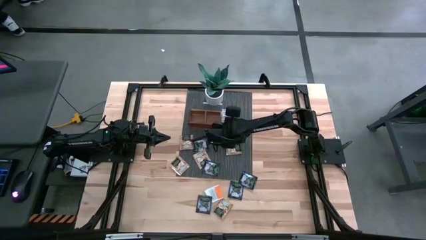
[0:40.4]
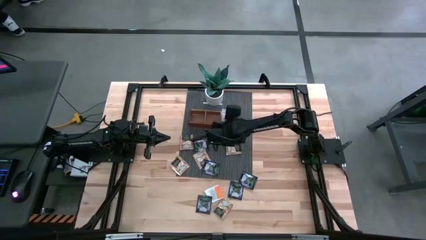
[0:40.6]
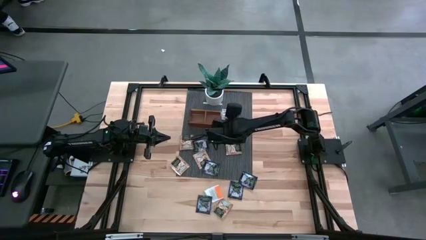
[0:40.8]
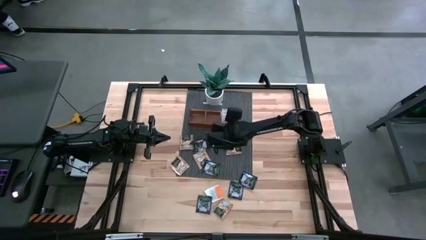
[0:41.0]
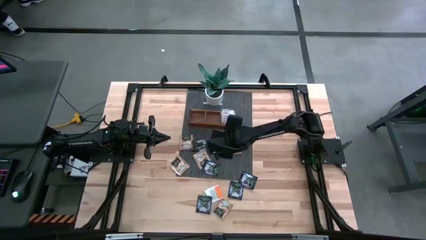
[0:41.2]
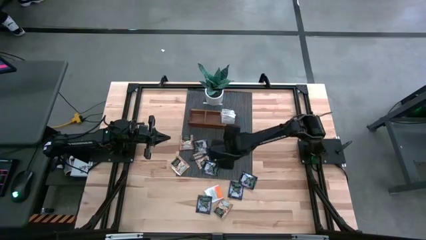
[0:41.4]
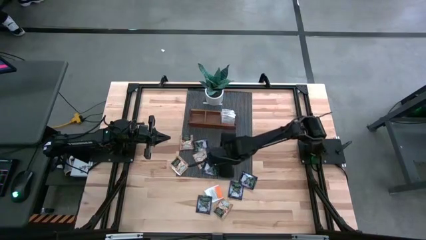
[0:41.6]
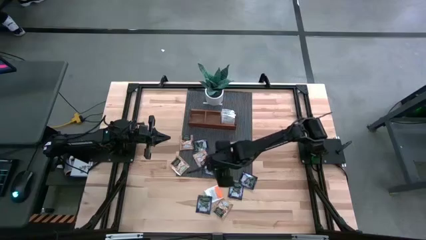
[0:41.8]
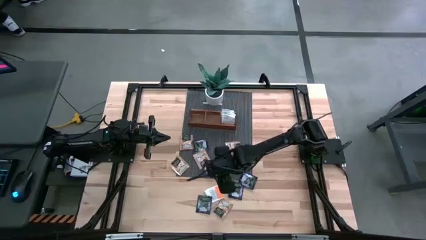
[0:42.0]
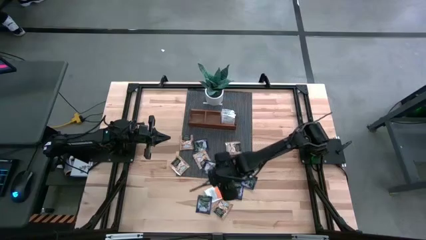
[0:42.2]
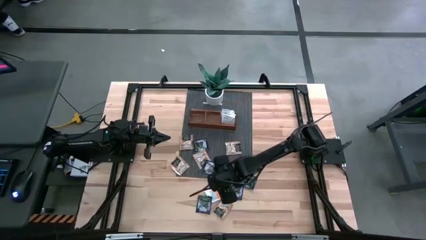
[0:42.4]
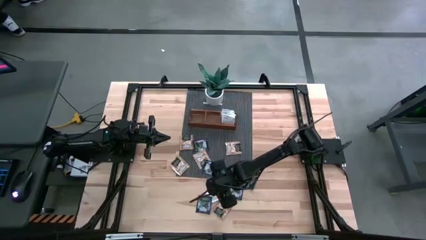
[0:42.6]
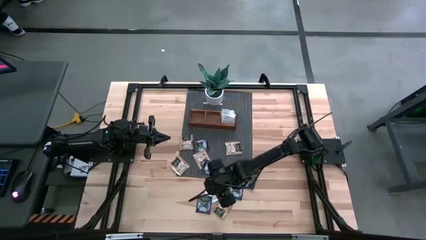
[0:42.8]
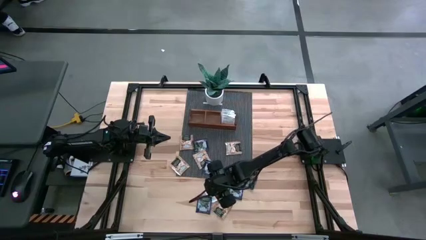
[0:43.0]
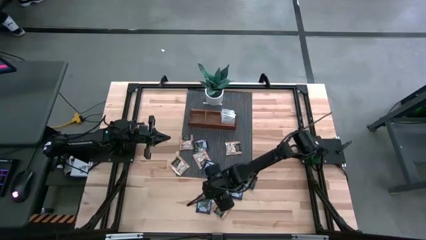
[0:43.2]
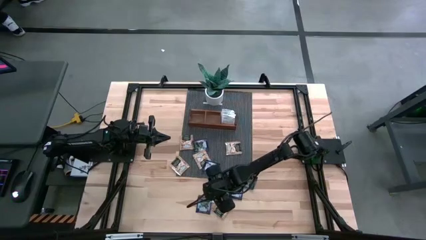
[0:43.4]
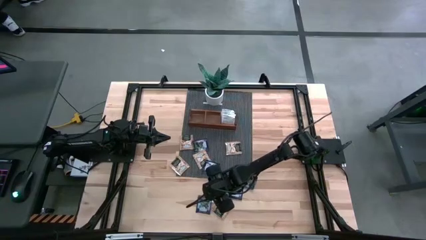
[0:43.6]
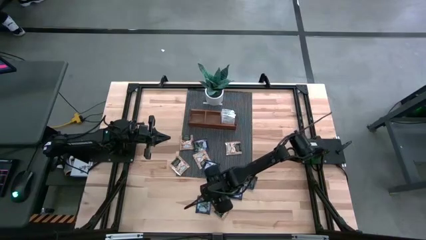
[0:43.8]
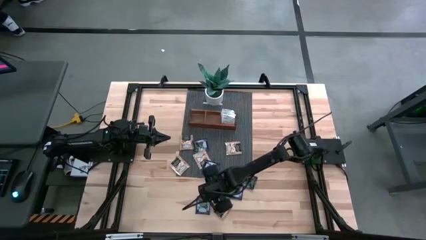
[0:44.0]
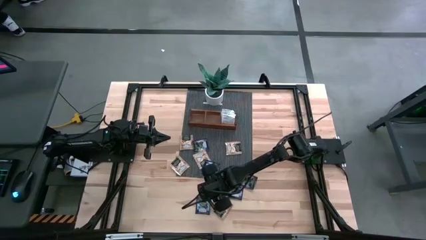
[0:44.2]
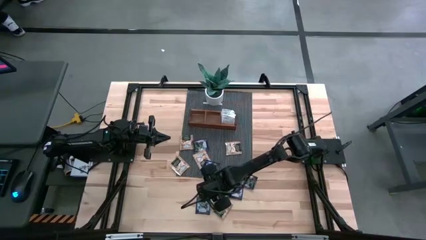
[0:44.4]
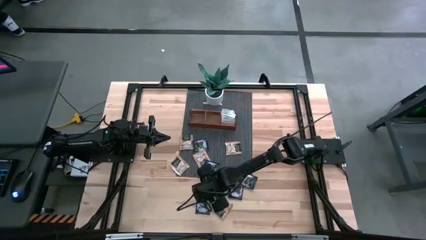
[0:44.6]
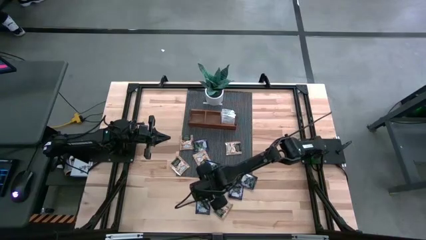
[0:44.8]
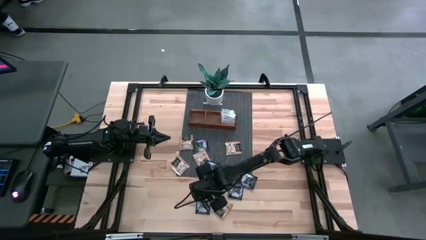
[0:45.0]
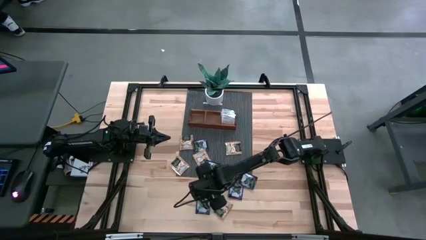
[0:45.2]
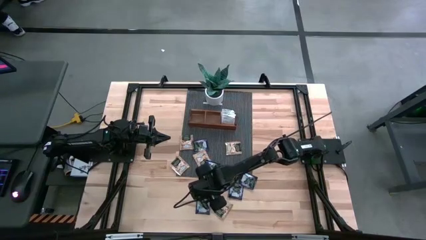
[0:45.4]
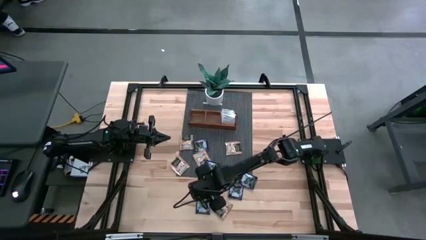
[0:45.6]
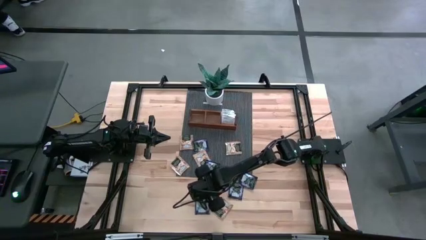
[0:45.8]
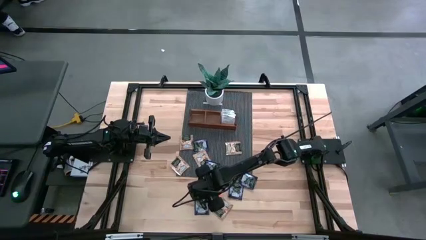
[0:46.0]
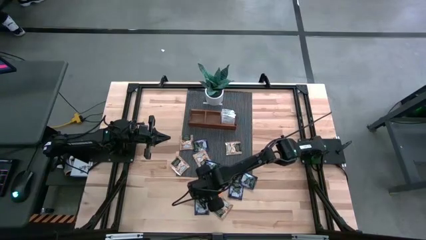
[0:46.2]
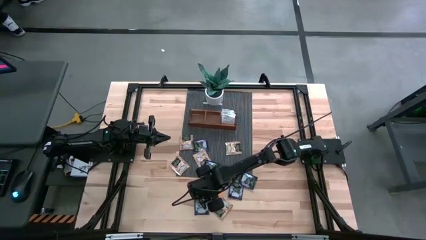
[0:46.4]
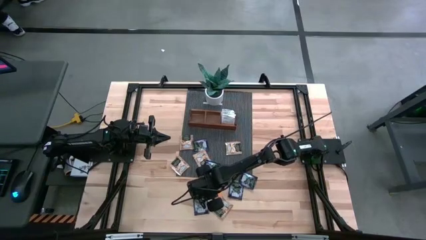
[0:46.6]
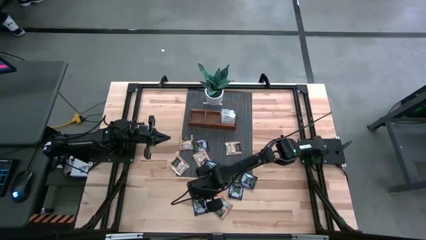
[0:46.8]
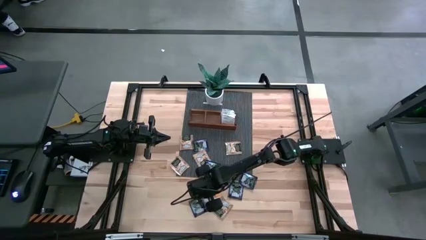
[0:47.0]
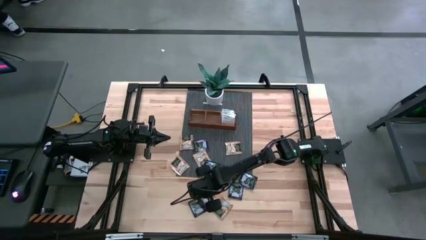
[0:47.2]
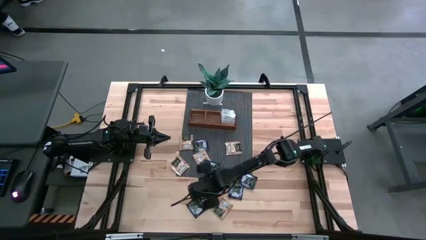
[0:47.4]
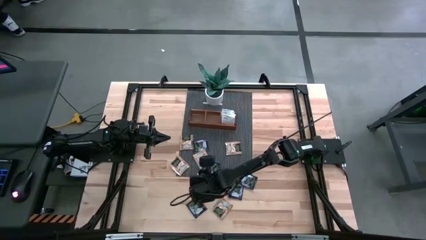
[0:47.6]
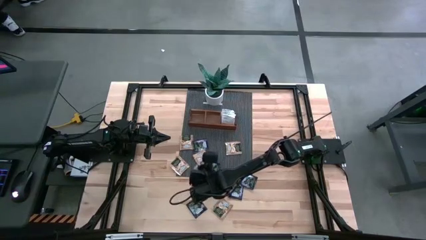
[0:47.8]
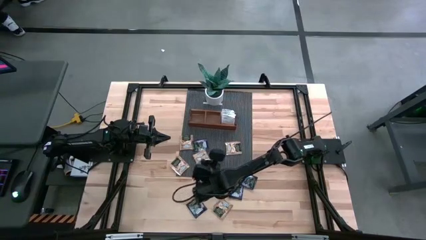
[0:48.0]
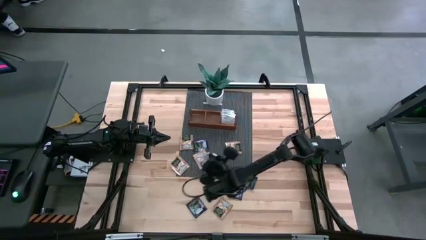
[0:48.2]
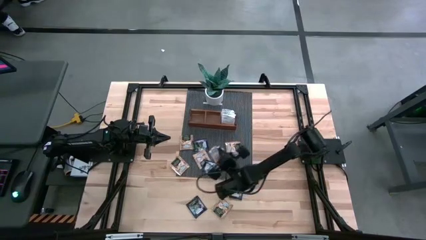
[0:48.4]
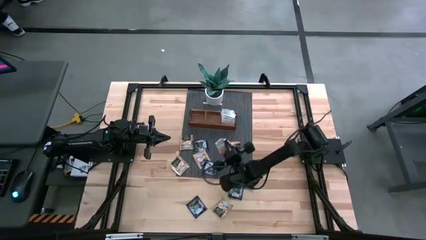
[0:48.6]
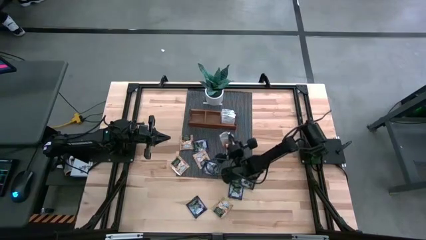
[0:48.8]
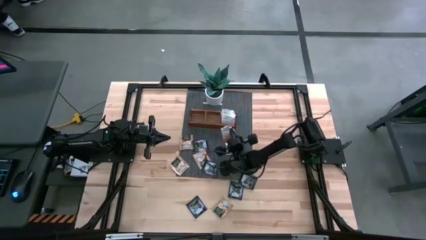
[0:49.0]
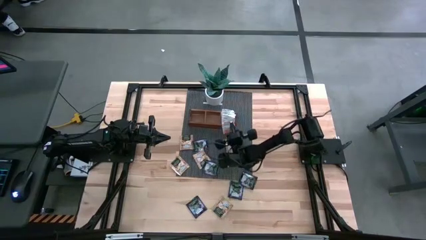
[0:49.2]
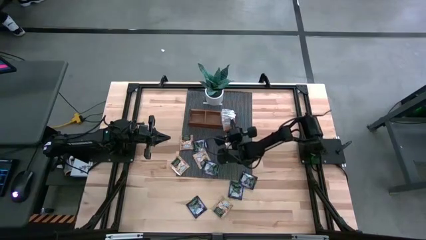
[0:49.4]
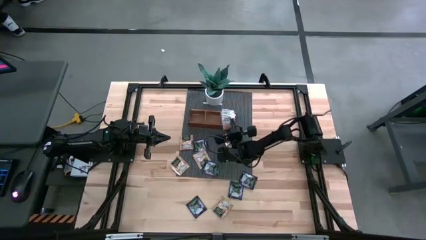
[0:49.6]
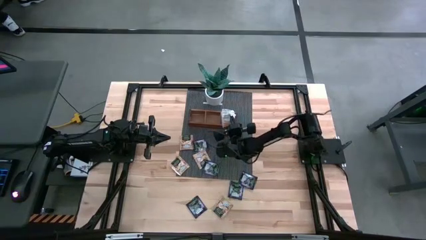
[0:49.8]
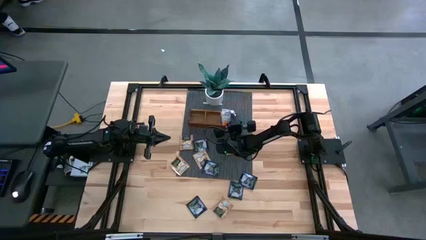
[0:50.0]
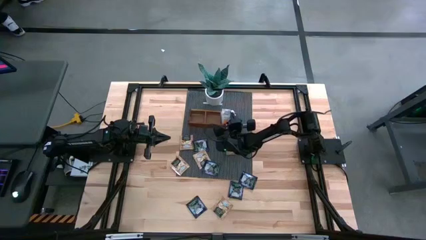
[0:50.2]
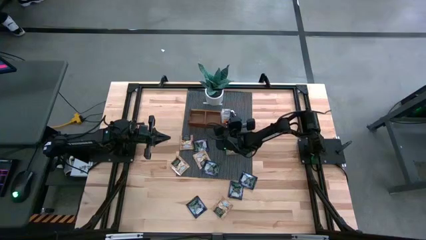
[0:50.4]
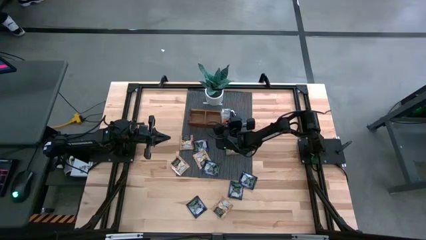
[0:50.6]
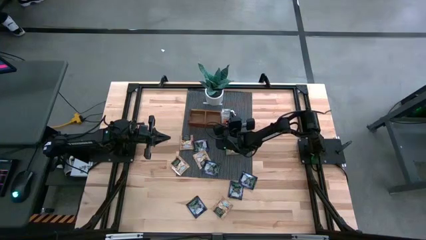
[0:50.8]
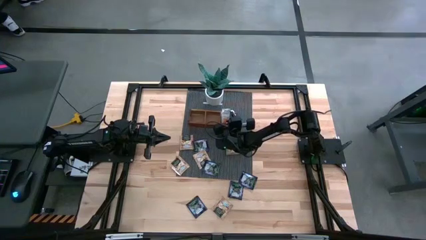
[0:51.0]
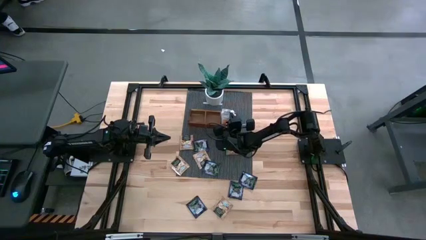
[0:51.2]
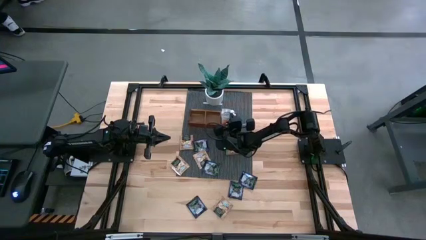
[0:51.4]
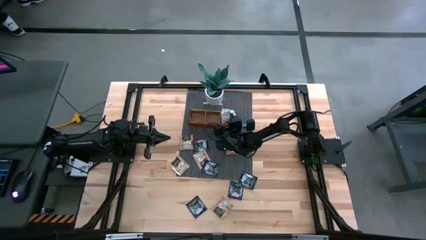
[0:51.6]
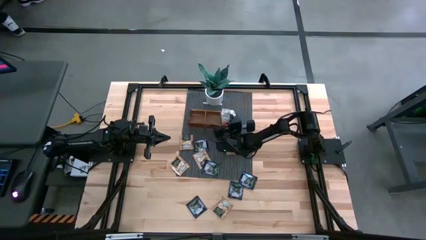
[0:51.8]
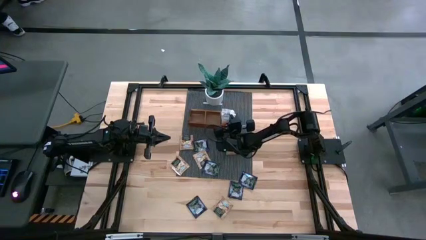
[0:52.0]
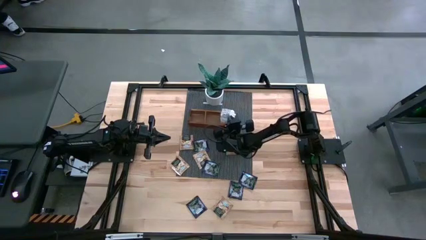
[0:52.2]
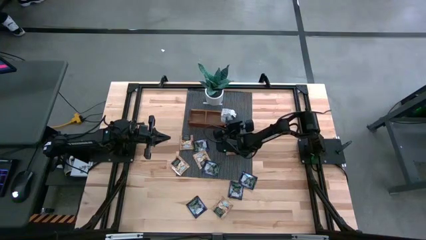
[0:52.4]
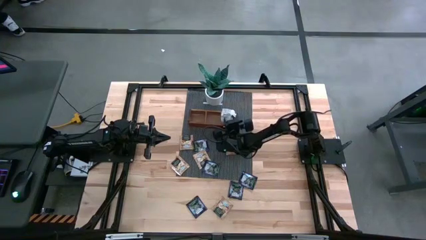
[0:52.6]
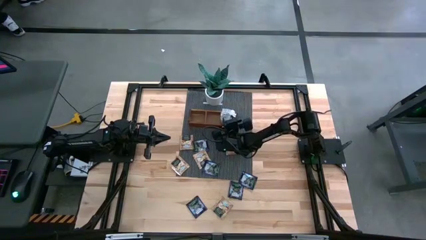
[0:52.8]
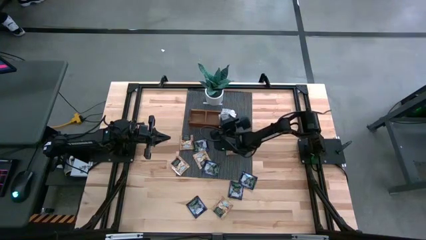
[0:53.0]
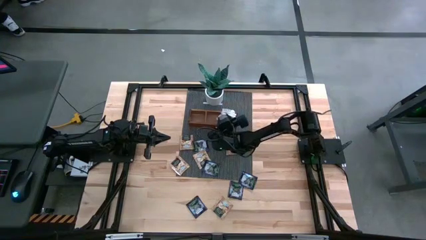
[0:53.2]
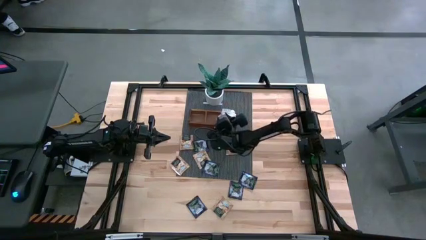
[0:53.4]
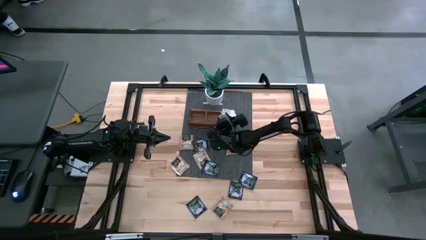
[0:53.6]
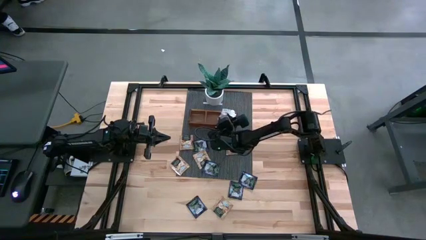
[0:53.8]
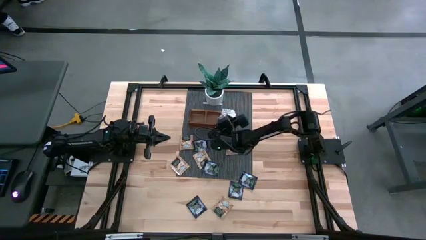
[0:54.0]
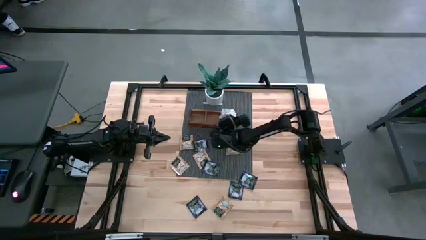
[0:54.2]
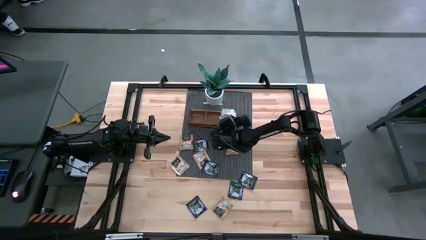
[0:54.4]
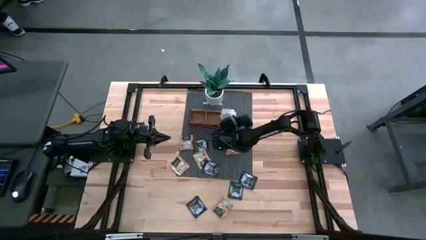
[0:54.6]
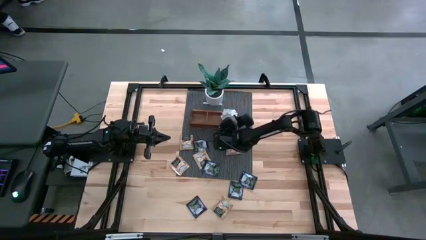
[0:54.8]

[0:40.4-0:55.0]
Task: Pick & Place Tea
Put the orange tea bag into the right section of the wooden organizer
